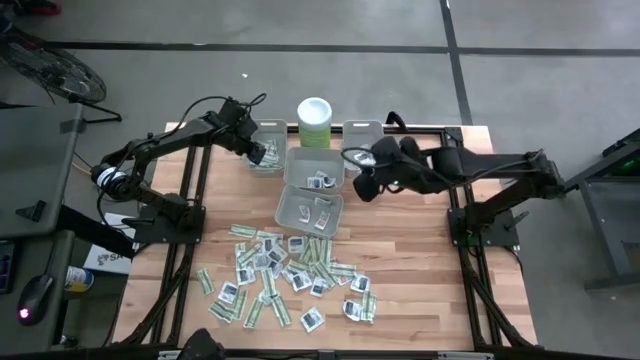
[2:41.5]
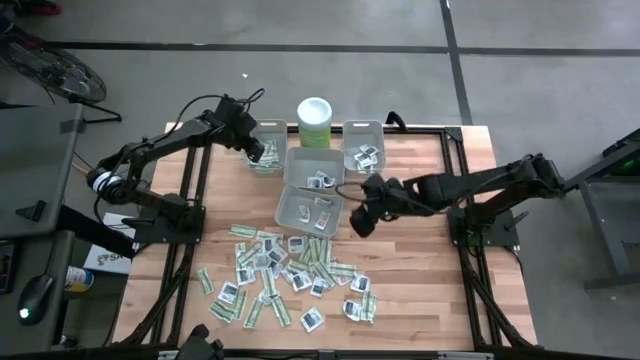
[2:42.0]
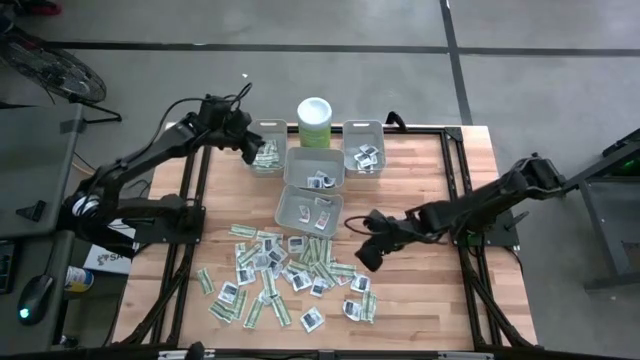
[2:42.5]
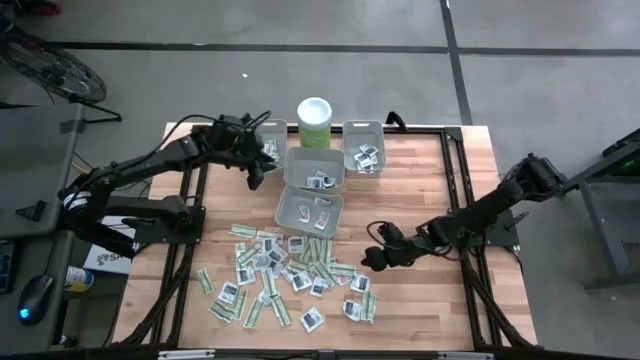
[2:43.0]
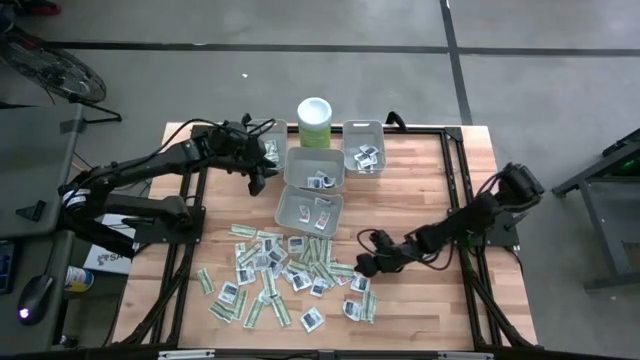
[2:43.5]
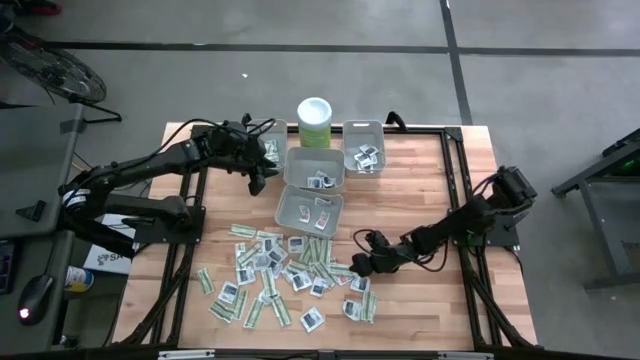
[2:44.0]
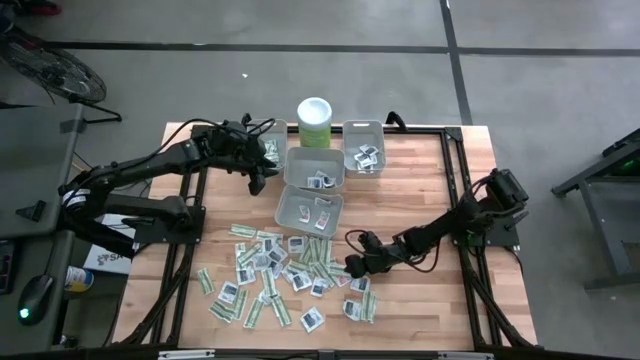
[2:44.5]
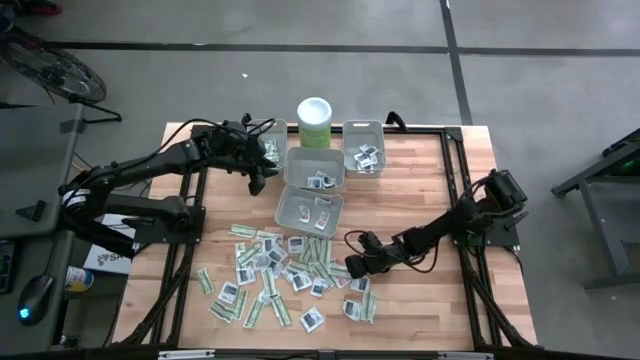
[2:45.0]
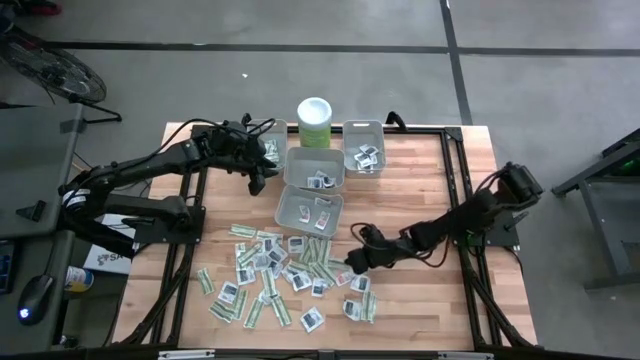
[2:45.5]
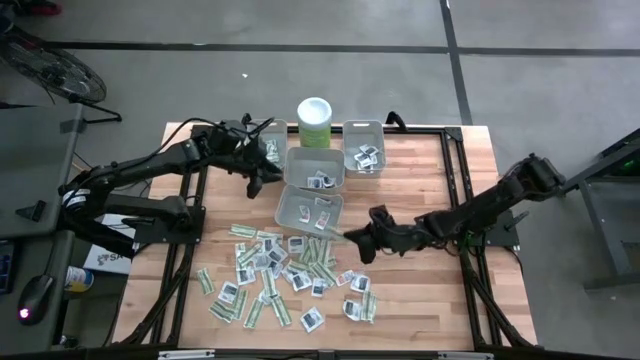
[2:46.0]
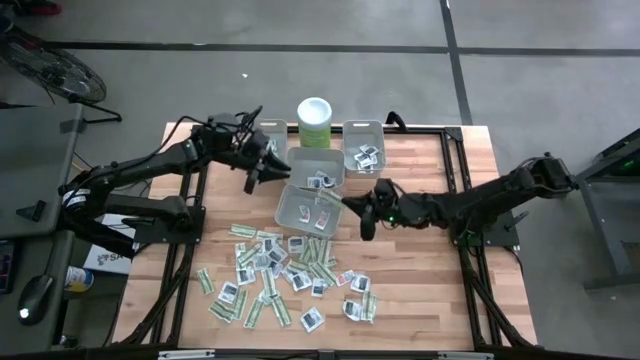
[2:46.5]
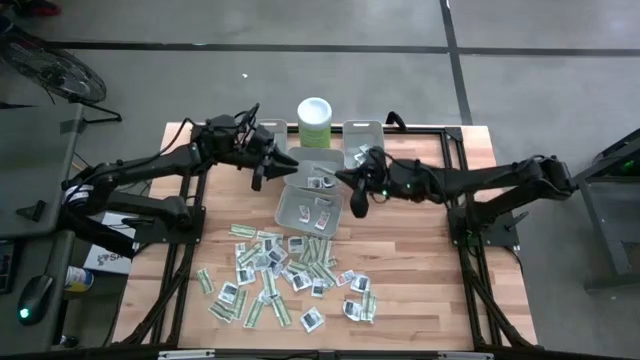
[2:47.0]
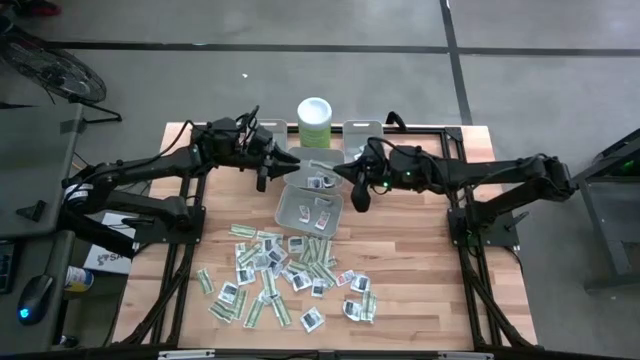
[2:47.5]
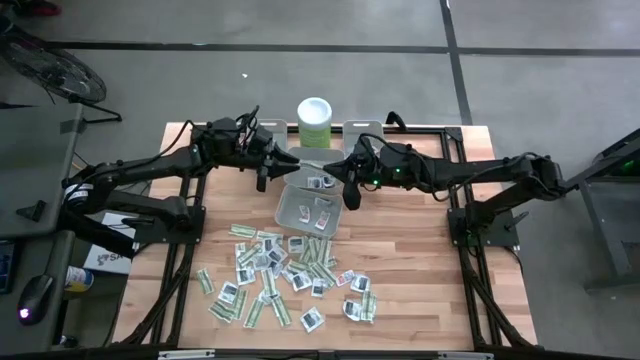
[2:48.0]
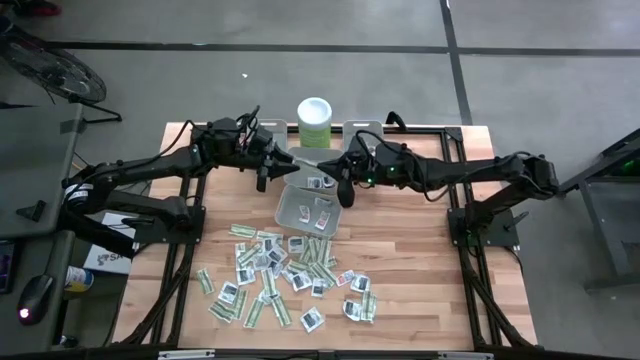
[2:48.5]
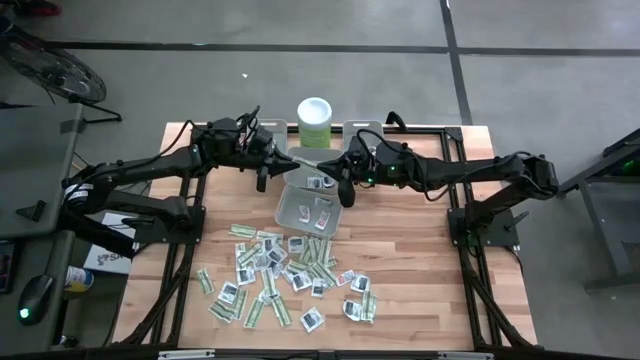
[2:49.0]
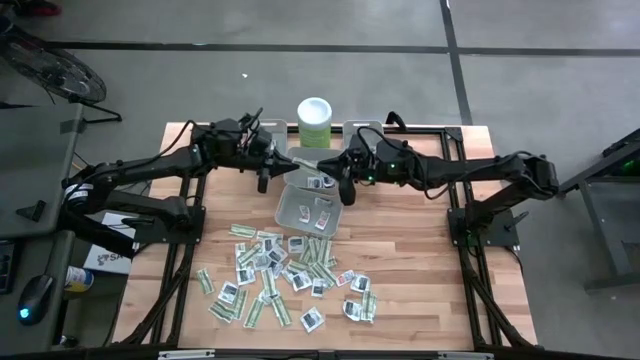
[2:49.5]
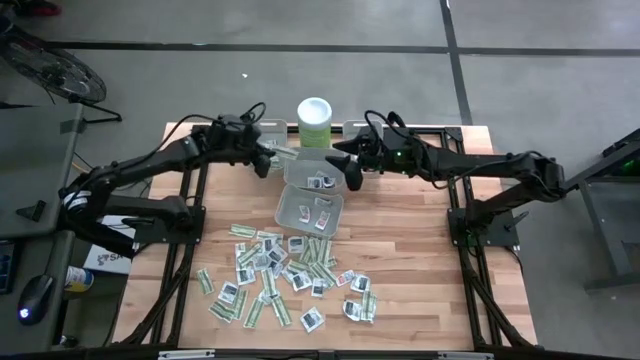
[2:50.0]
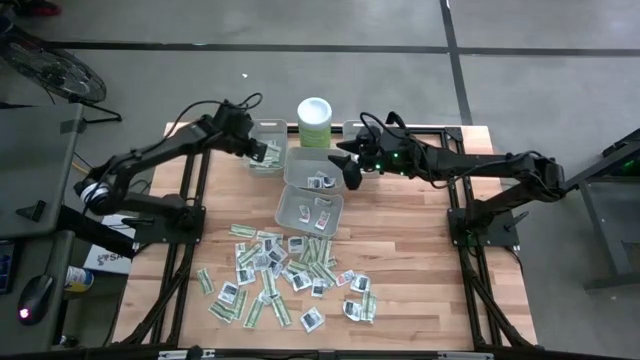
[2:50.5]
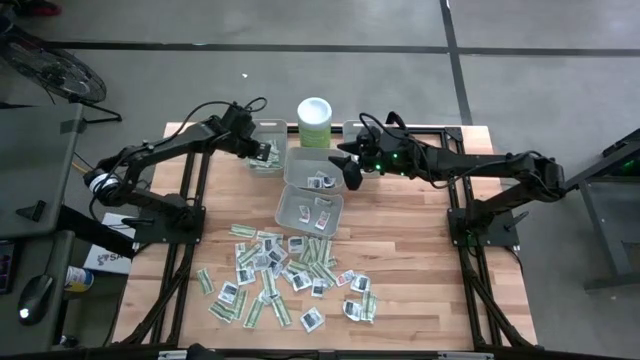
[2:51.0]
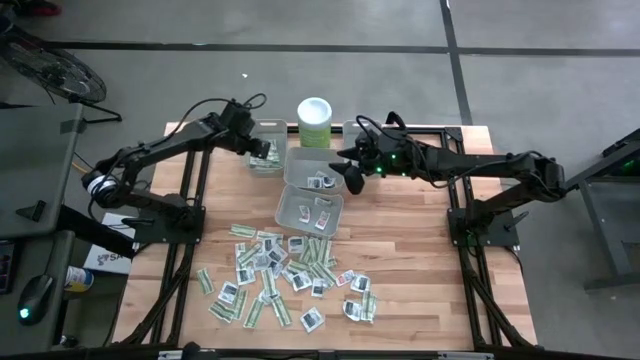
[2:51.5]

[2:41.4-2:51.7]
Task: Pick & Place First Aid Supplies
Put the bandage pack into the left bin

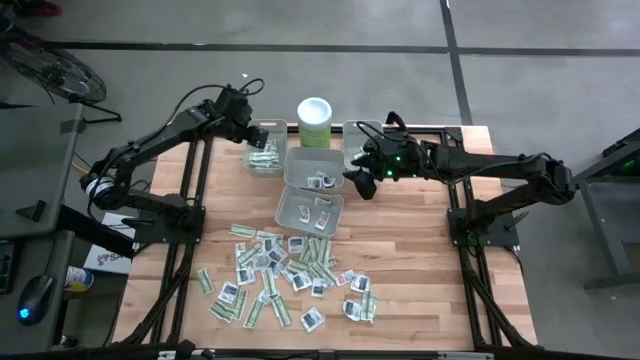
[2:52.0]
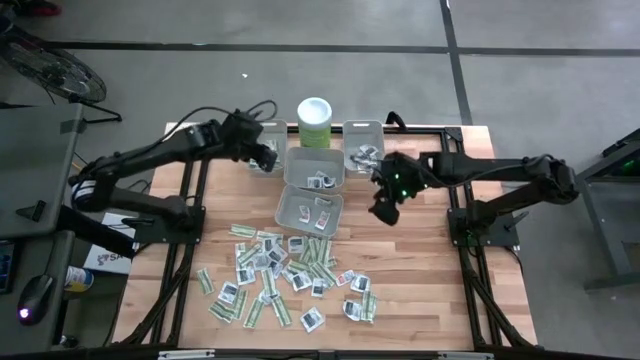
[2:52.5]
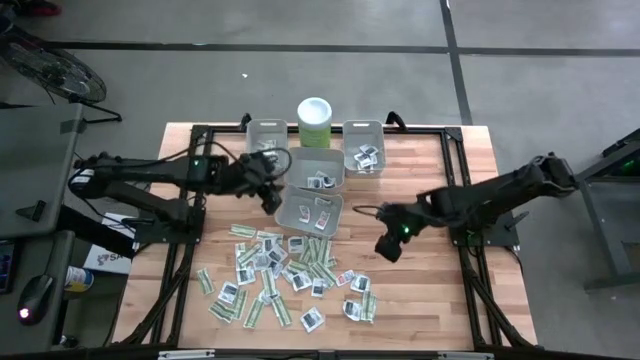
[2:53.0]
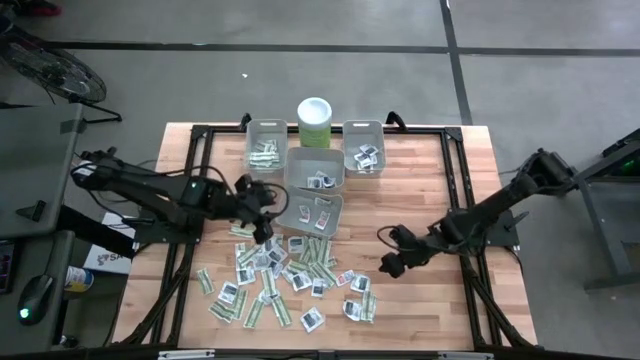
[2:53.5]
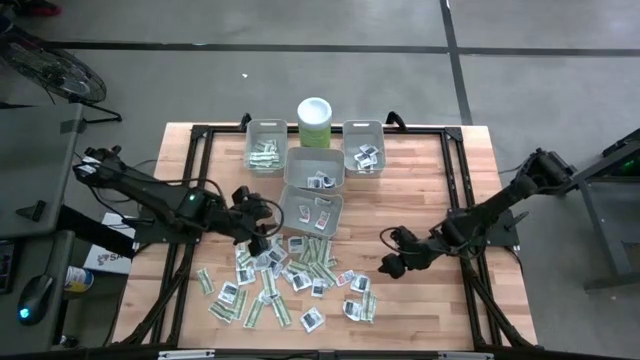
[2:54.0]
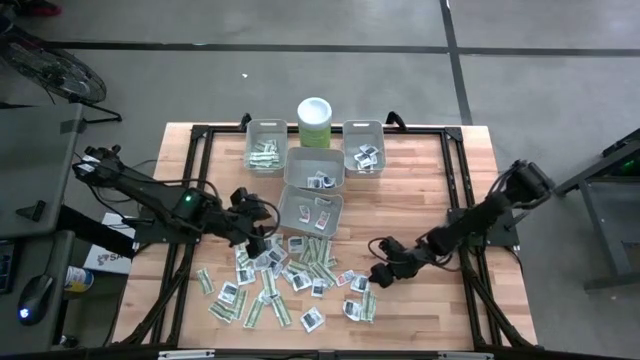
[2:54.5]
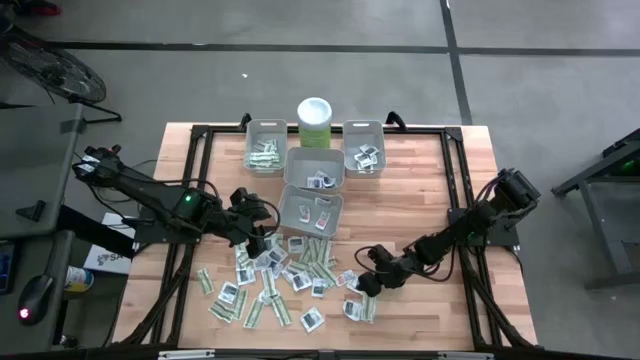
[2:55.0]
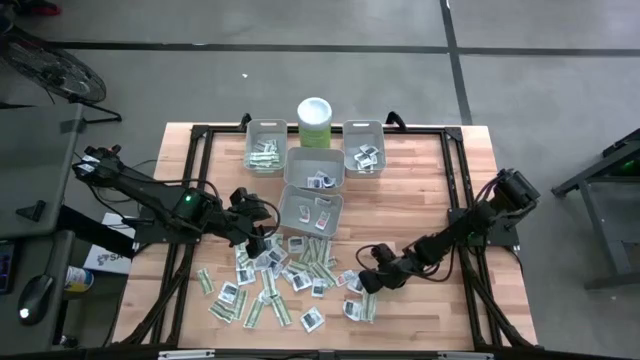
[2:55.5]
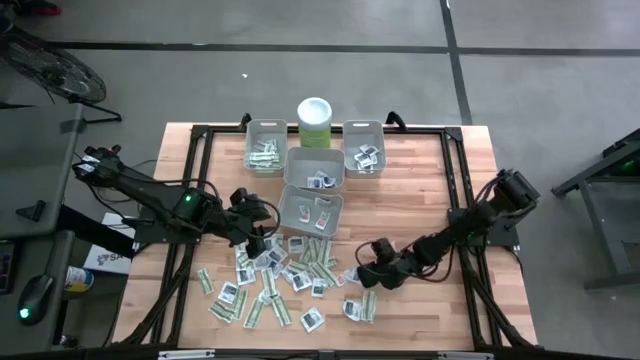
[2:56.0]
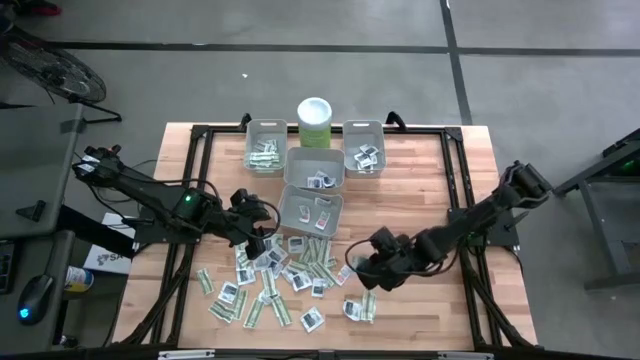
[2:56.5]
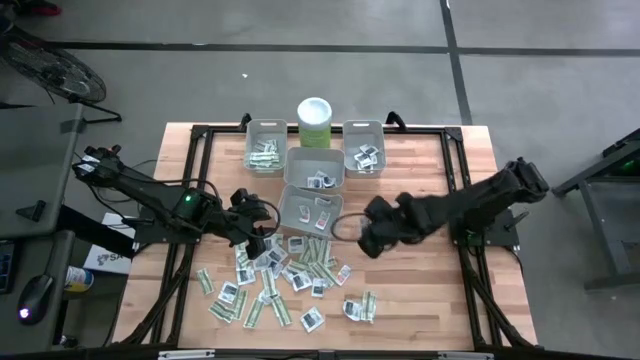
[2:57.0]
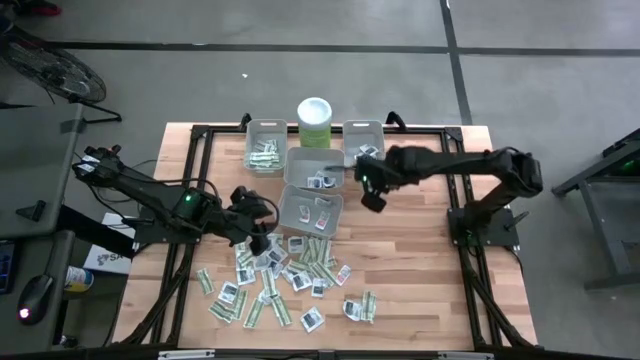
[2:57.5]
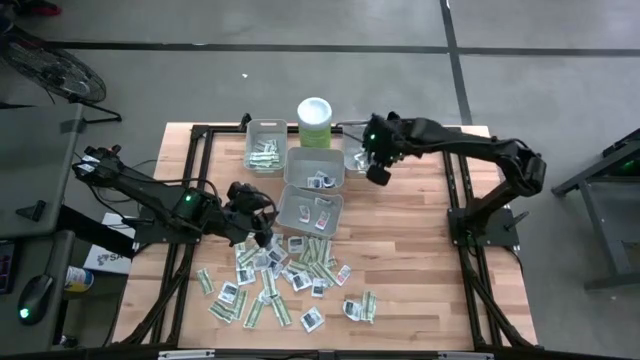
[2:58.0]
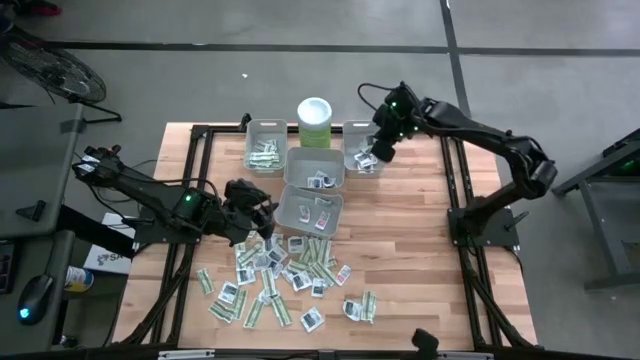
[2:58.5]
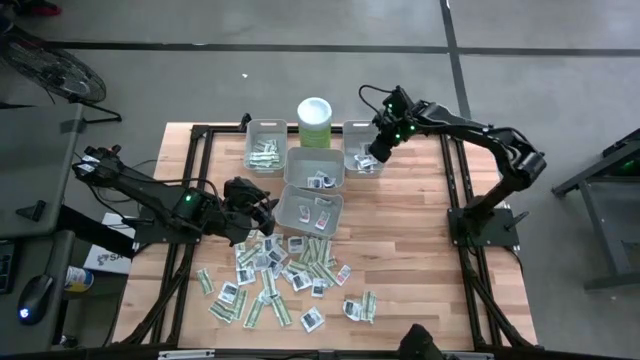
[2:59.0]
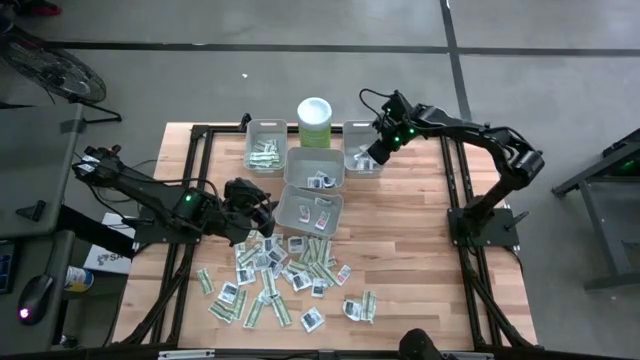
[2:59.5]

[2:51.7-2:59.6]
Put the towelette pack into the right bin

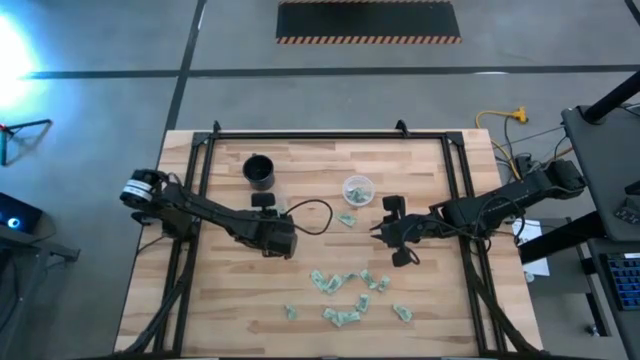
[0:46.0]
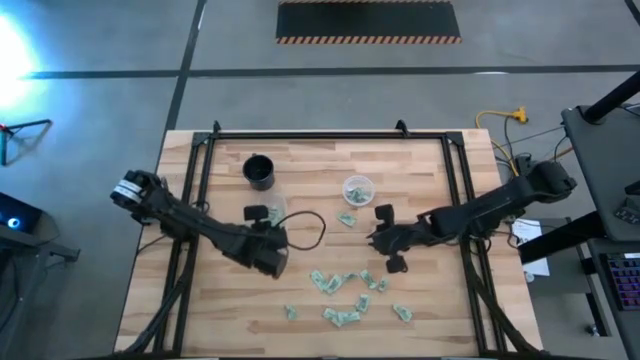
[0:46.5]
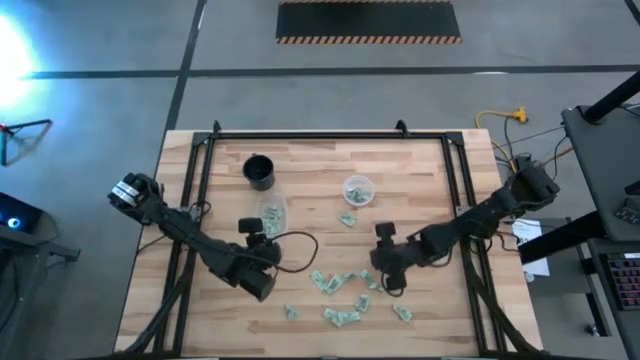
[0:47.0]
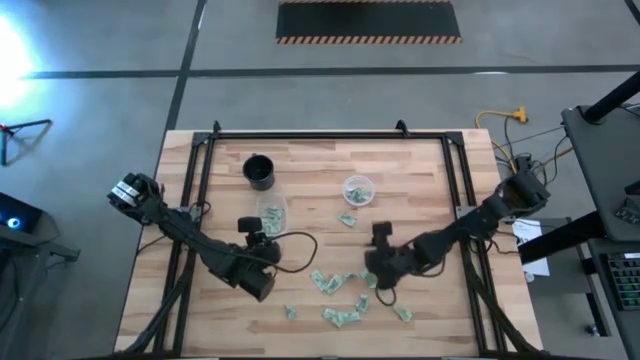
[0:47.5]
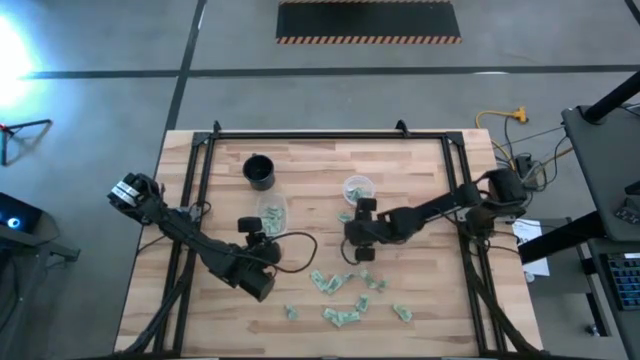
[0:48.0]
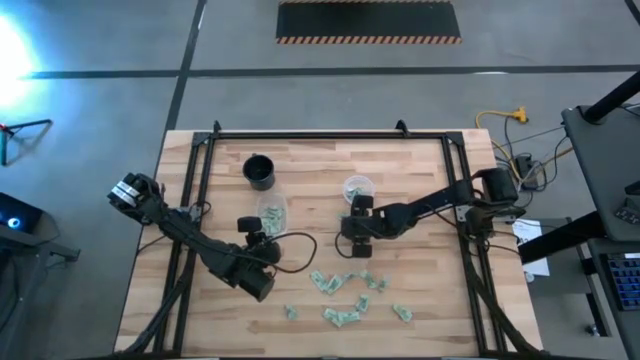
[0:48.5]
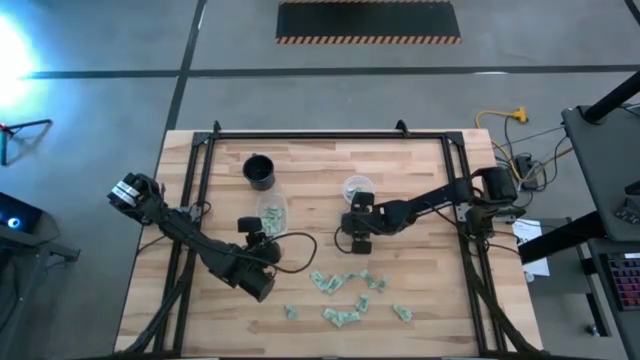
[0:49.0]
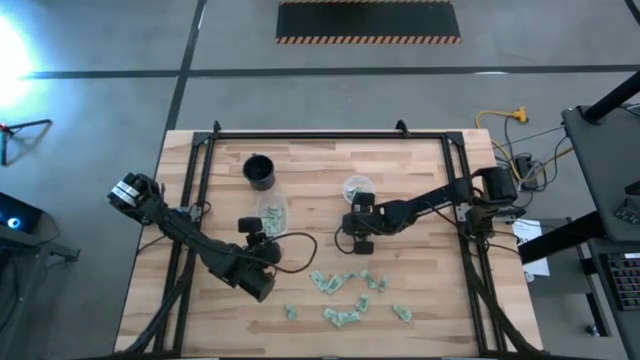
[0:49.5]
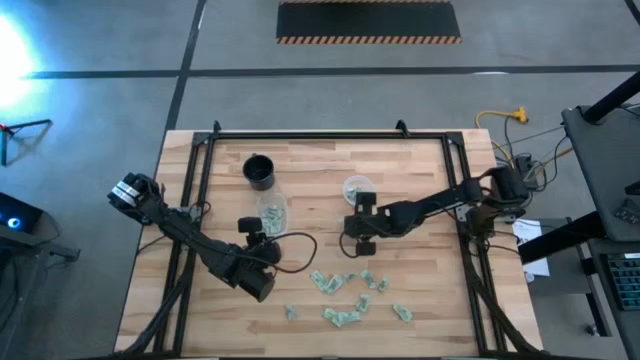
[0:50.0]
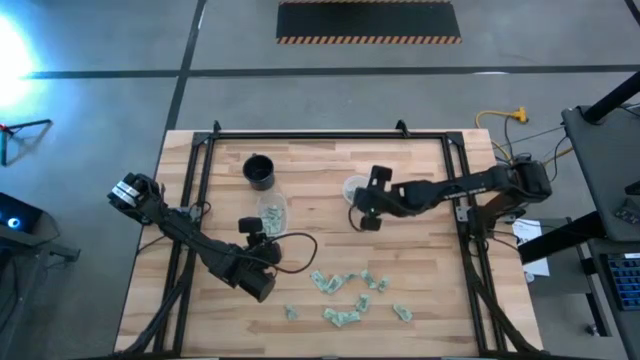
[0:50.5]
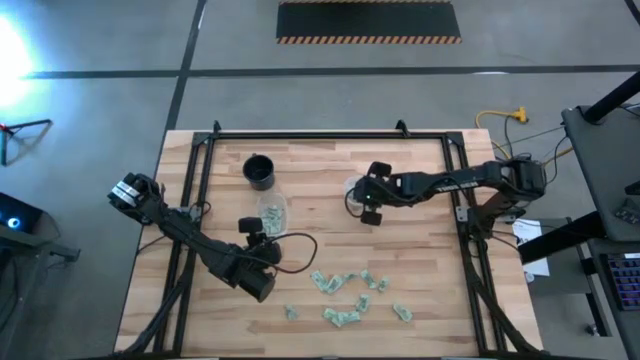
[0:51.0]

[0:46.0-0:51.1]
Task: Pick and place items into bin
Put the stevia packet into the right transparent bin
